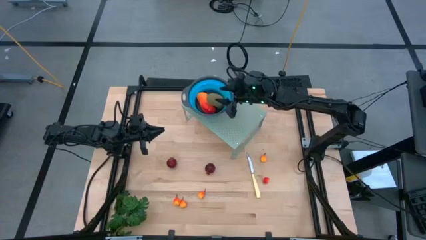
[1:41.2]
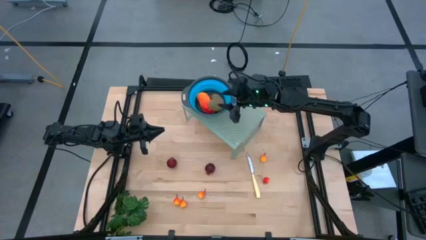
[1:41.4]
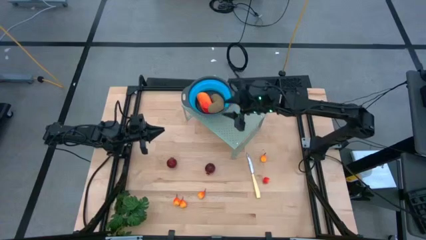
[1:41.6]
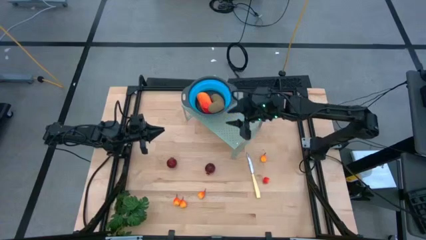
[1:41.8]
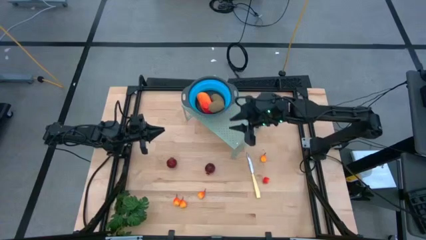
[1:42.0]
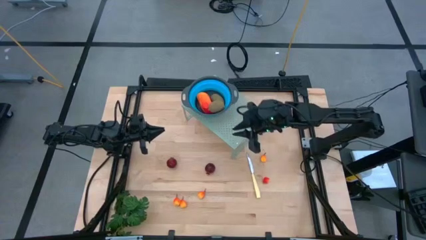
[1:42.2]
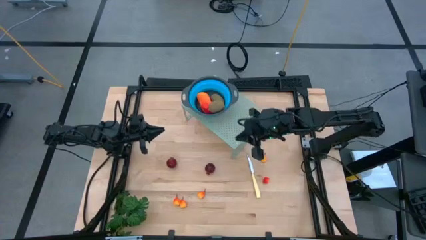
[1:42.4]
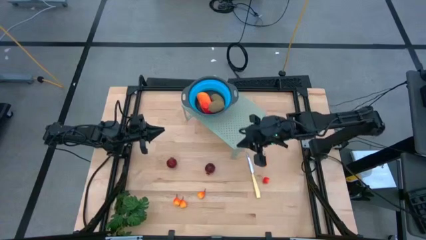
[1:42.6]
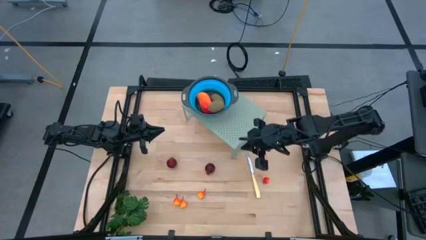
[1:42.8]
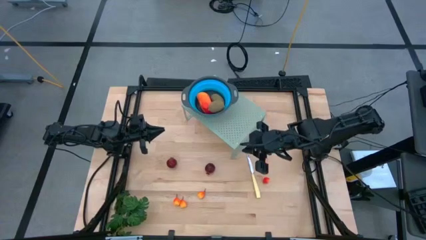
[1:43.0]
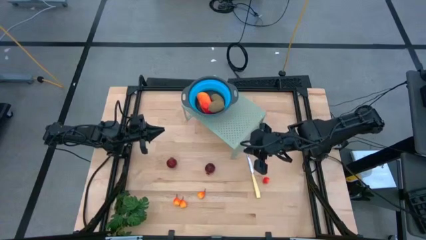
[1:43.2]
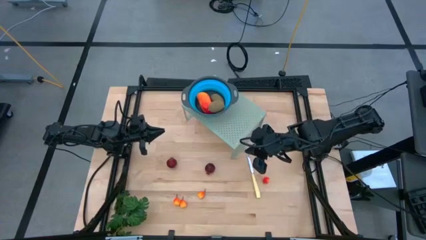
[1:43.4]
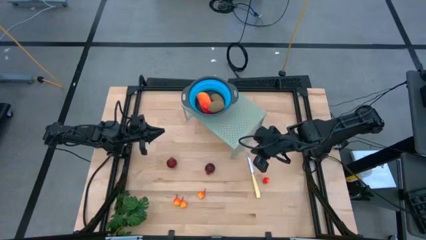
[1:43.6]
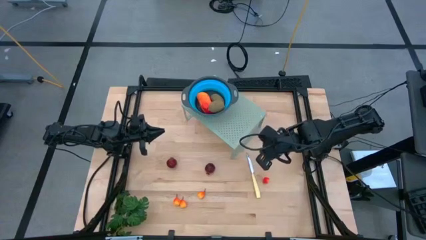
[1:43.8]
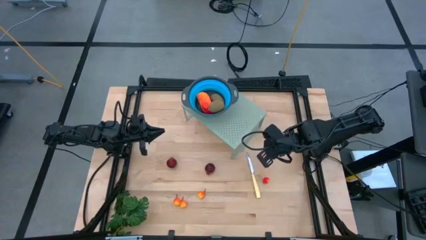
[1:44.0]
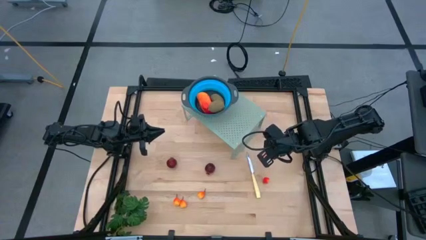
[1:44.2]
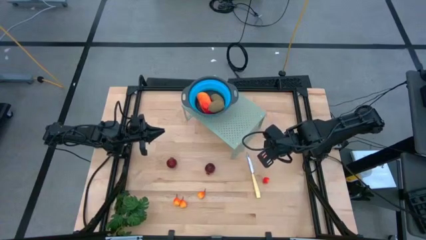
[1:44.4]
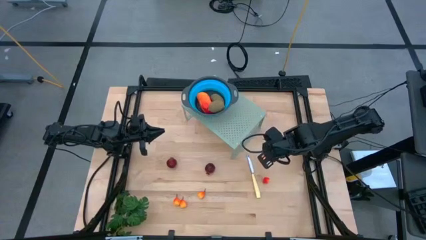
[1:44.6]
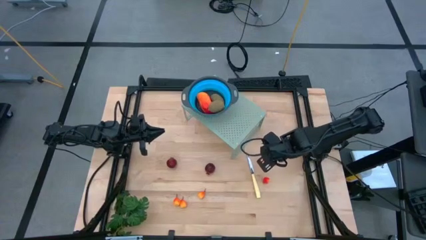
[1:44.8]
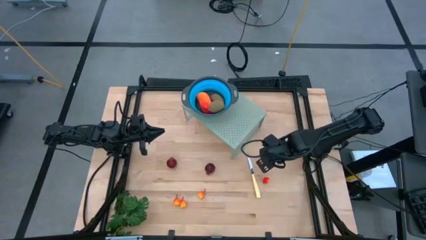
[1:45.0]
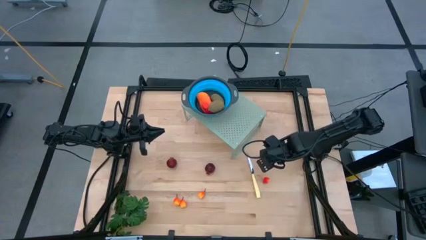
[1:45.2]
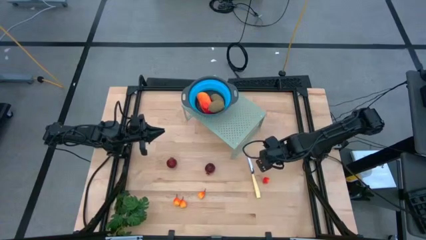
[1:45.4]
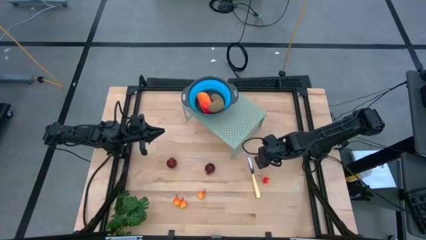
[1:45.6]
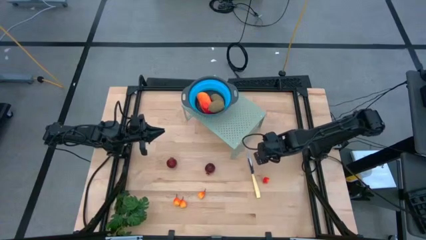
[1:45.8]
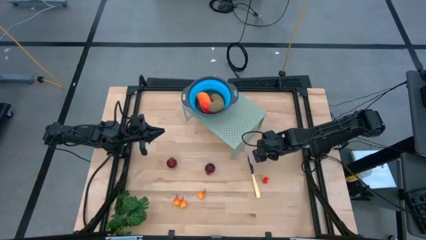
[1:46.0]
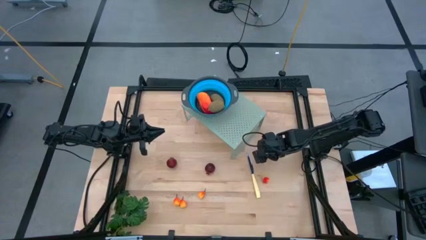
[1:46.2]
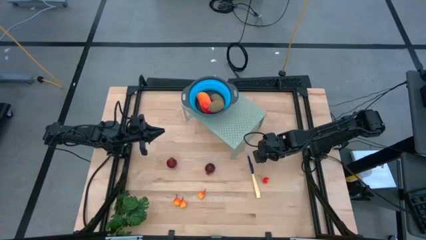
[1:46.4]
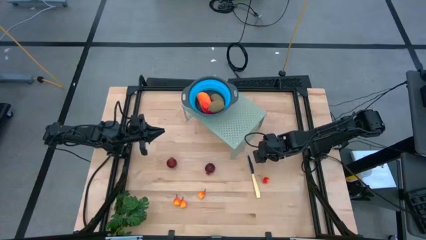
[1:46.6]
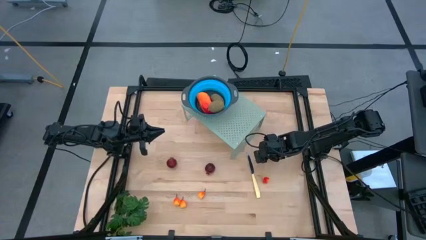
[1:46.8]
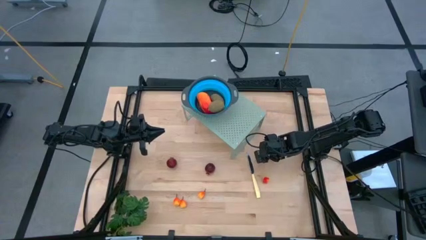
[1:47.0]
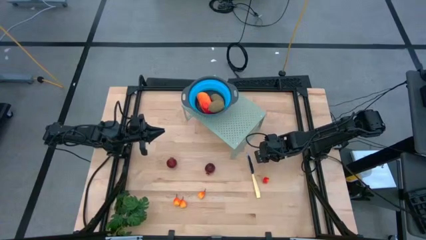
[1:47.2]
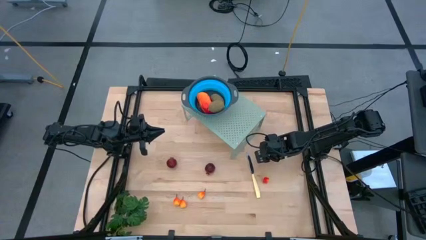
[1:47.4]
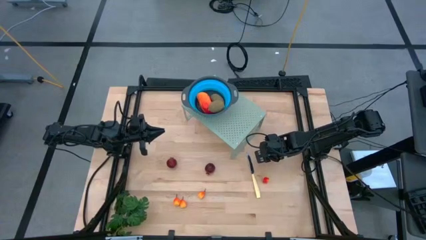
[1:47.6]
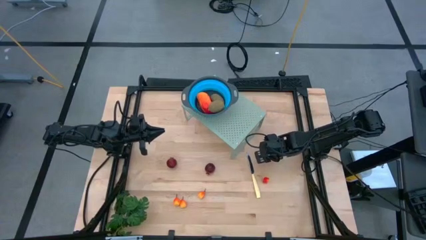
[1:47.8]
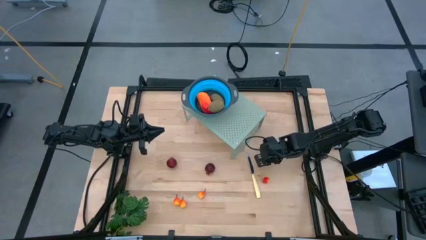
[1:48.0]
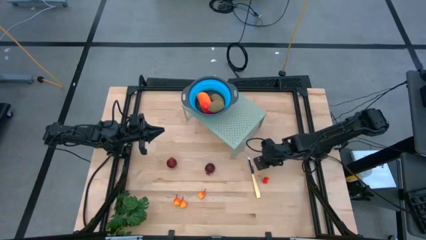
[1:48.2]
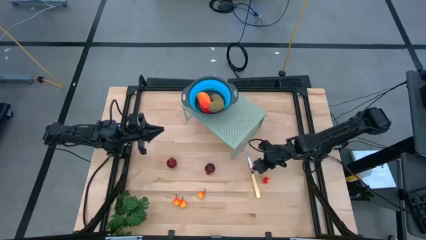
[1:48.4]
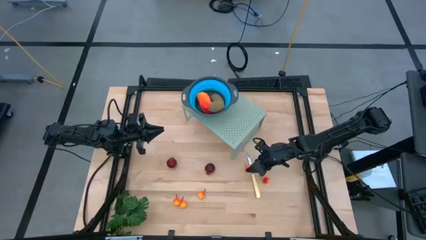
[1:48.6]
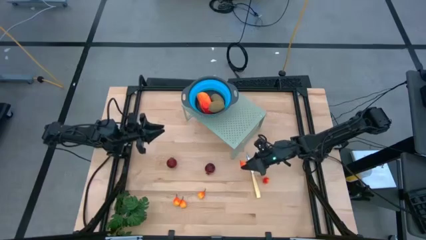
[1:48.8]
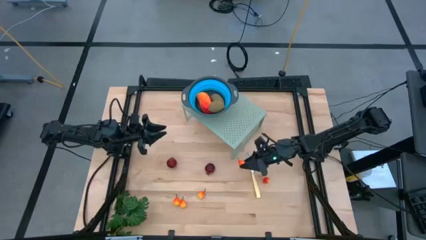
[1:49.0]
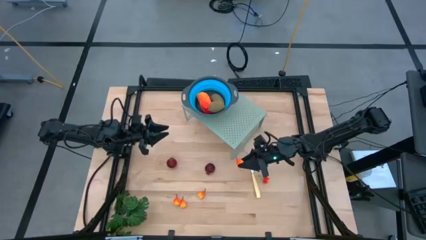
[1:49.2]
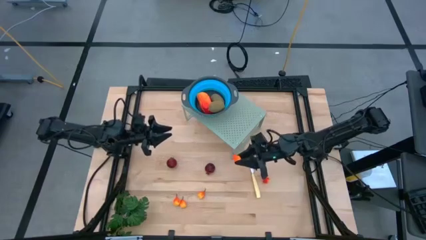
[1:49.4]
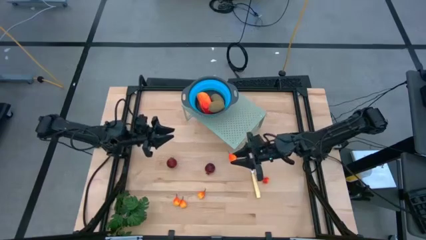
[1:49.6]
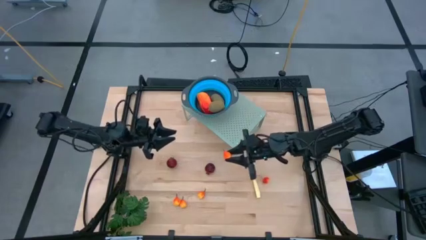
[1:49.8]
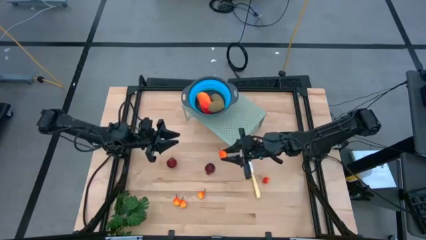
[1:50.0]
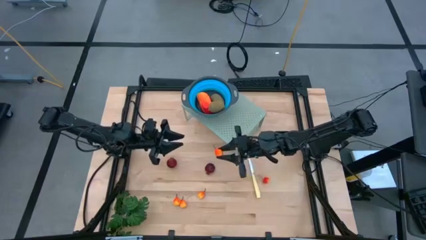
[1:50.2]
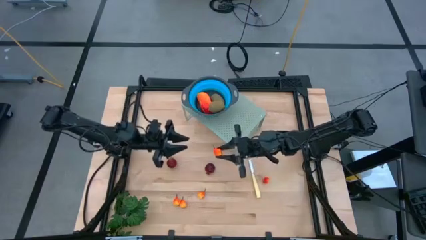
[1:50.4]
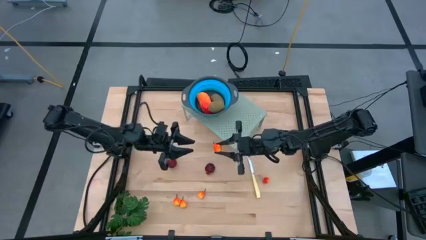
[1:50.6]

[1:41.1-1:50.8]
Task: Pick & Place Fruit
Put the pear into the blue strainer bowl on the shelf

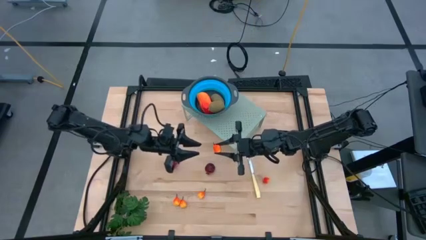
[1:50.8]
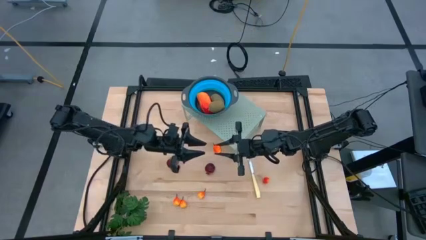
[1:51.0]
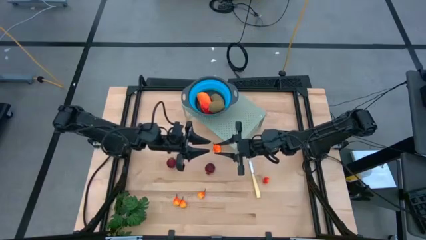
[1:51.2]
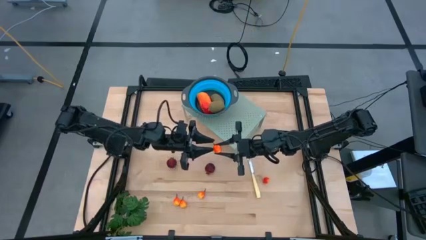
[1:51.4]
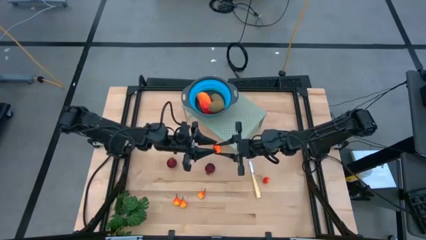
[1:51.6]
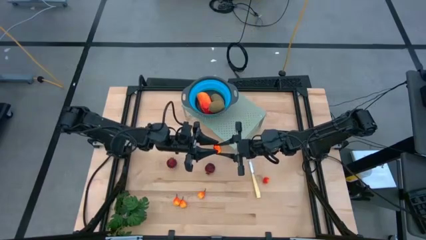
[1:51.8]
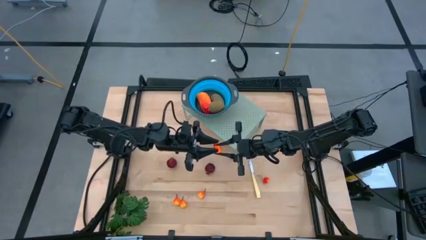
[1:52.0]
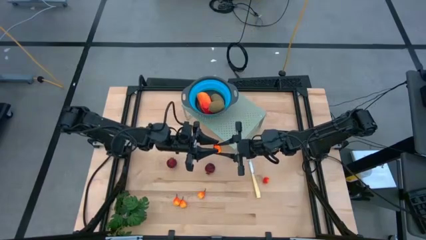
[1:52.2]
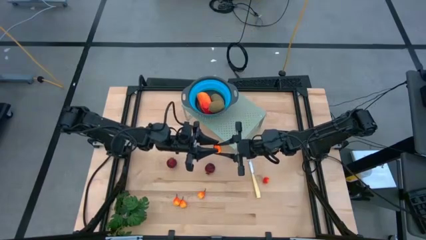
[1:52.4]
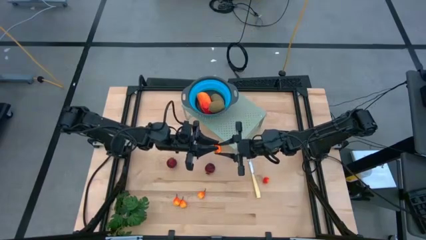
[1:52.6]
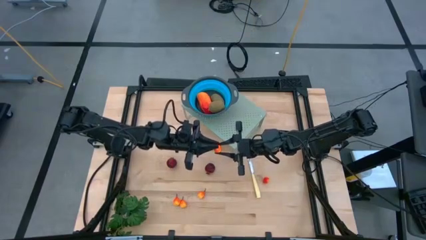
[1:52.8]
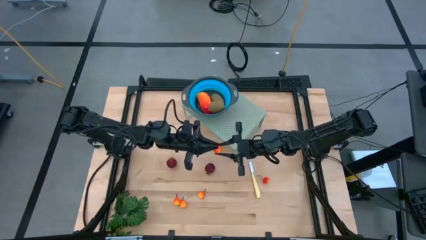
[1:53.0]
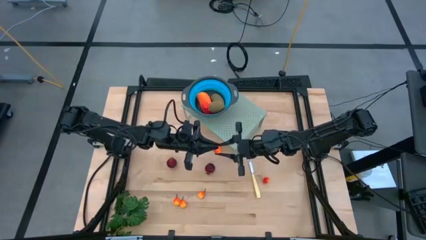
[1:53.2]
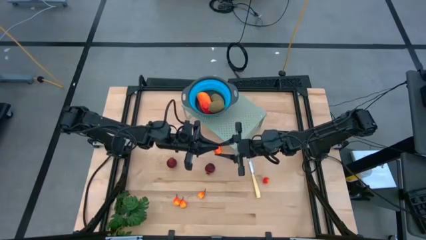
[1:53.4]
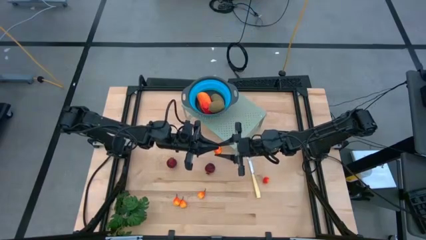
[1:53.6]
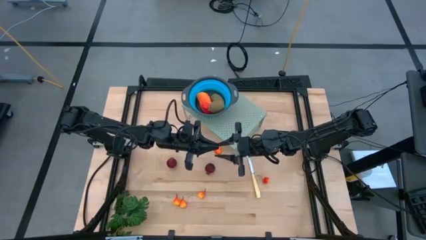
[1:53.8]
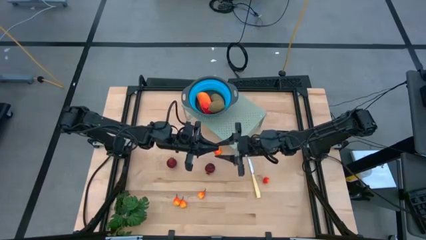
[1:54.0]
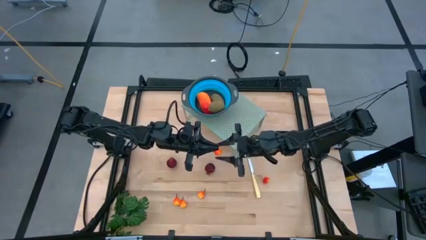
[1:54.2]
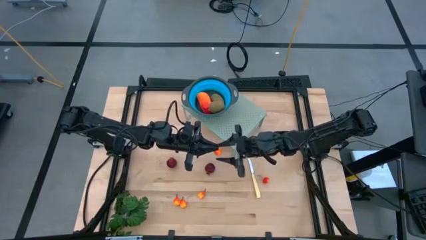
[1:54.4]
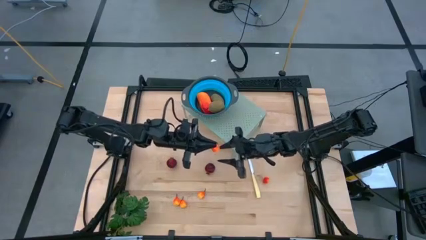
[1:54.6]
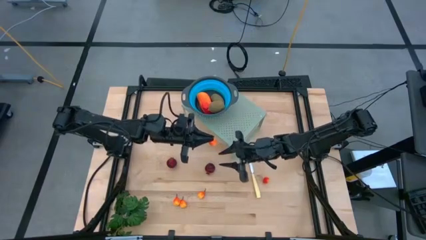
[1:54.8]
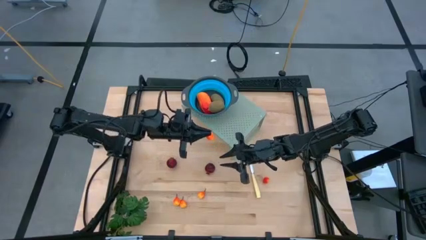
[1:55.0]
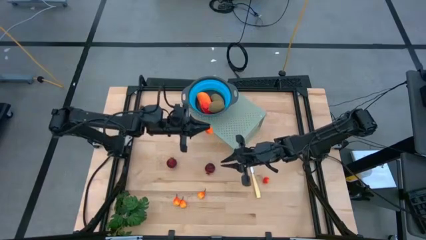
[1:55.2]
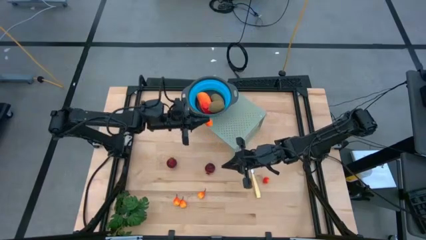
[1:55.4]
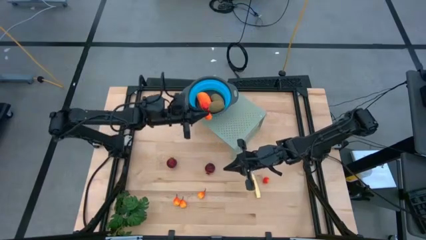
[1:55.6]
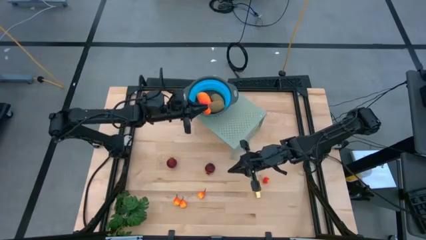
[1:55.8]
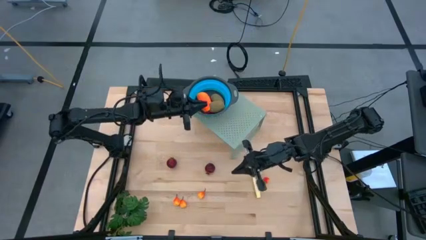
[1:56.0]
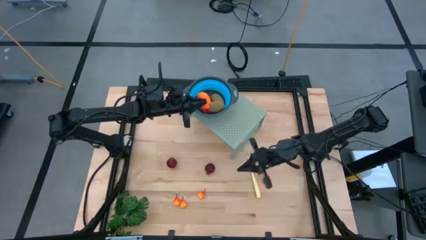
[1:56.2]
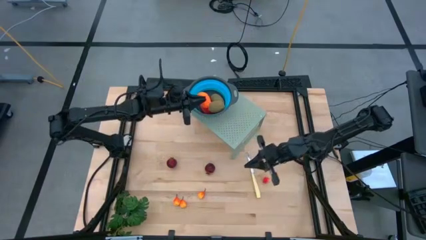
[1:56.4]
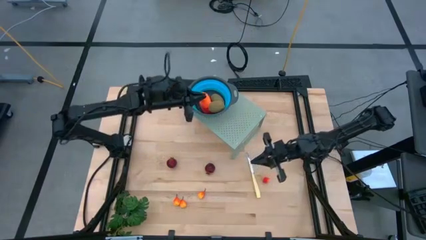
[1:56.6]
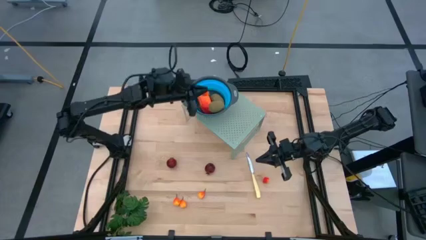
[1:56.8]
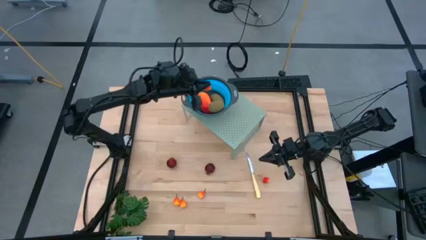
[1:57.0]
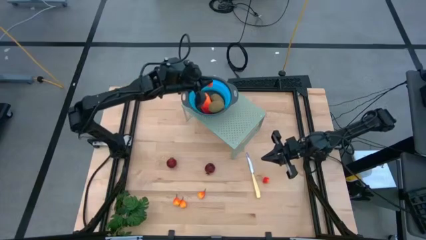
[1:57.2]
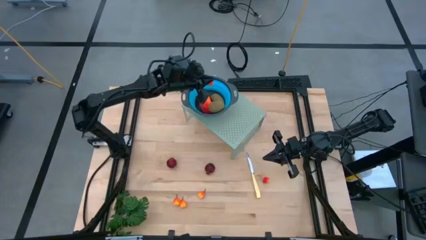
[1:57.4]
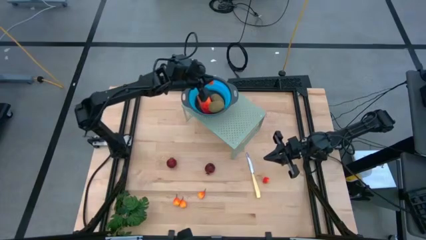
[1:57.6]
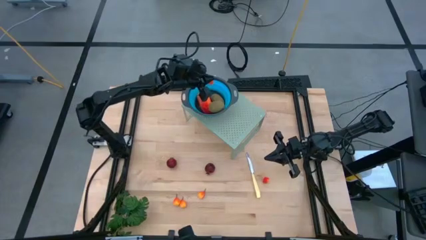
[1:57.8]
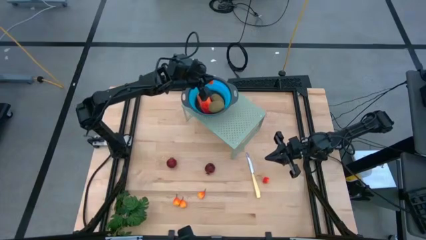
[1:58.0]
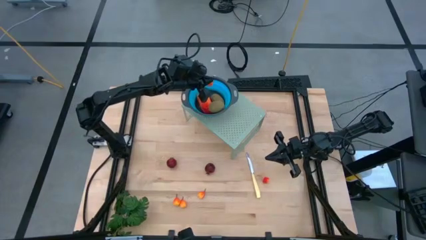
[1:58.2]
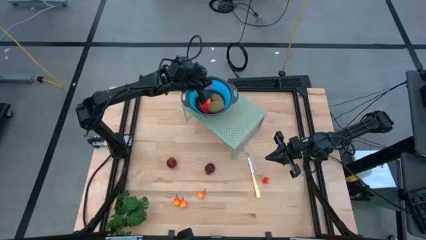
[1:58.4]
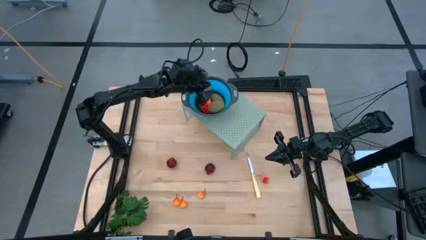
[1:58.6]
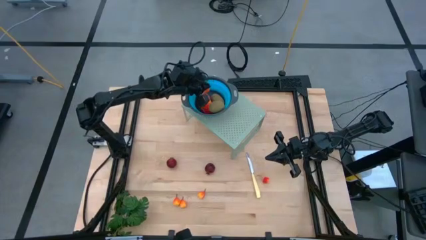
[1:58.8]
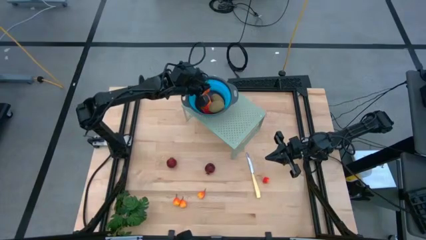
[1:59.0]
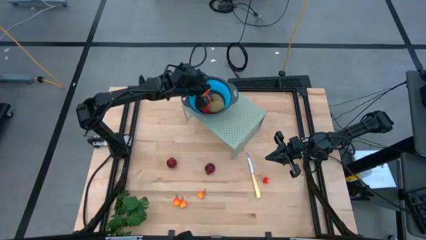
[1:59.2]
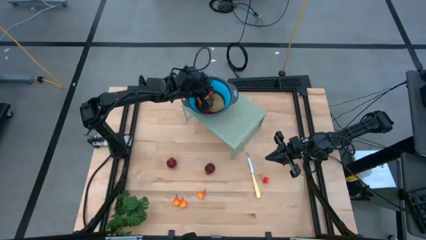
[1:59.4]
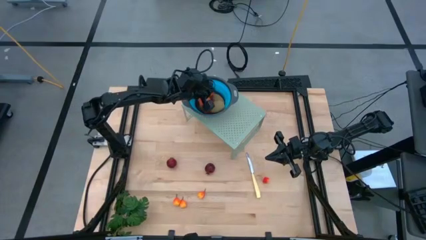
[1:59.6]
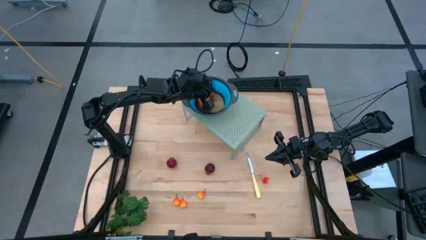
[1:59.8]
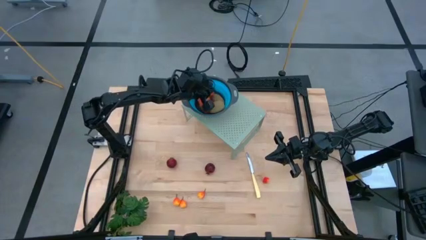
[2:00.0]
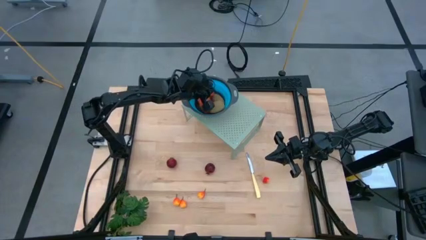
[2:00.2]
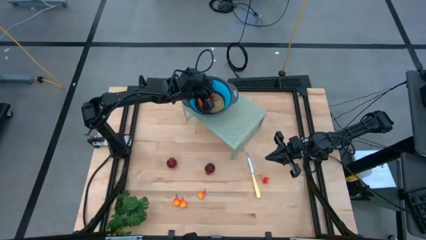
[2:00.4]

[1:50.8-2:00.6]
Put the pear into the blue strainer bowl on the shelf
